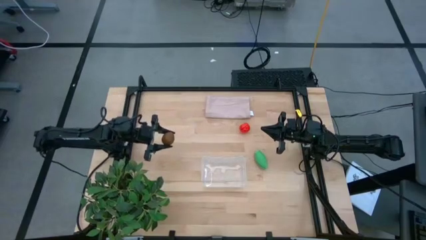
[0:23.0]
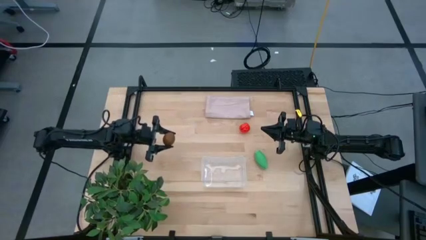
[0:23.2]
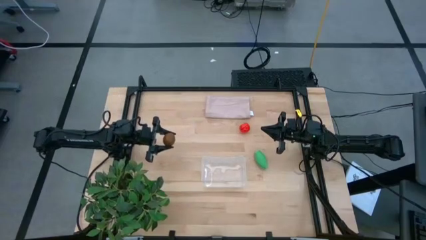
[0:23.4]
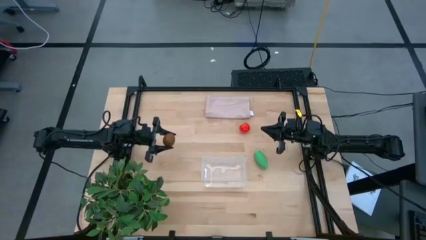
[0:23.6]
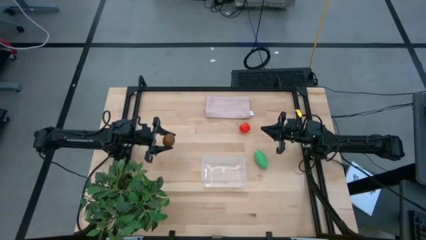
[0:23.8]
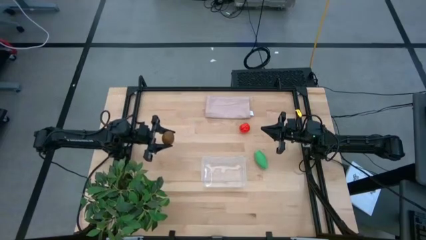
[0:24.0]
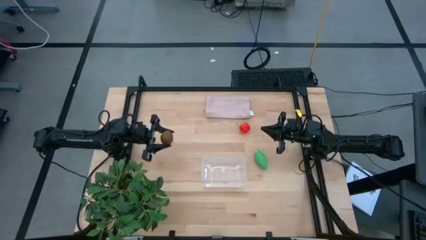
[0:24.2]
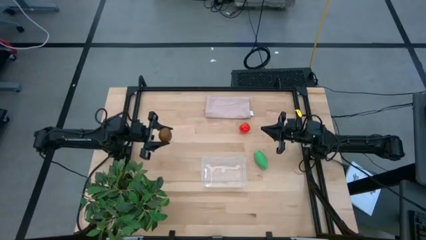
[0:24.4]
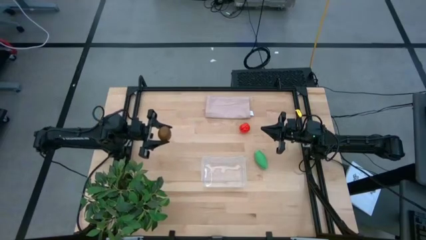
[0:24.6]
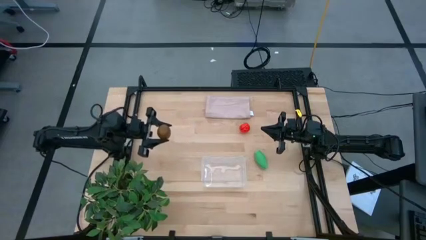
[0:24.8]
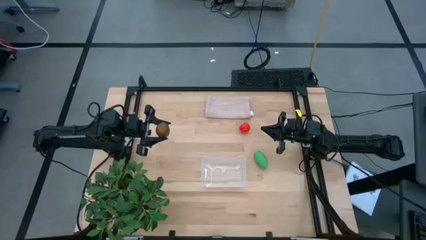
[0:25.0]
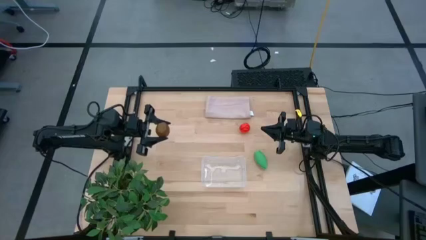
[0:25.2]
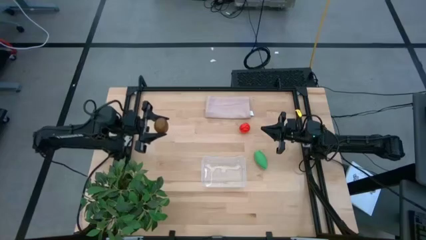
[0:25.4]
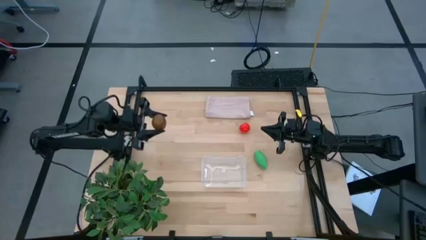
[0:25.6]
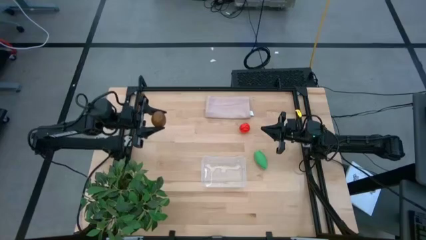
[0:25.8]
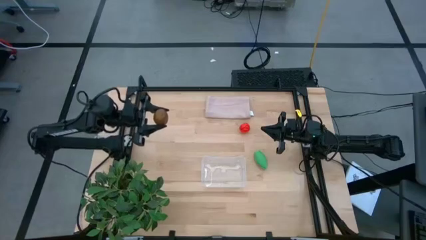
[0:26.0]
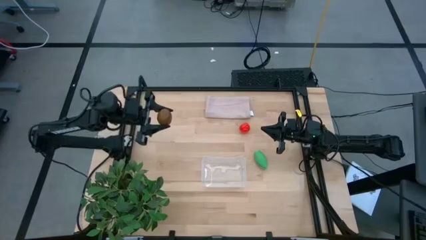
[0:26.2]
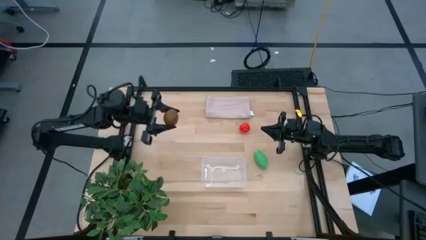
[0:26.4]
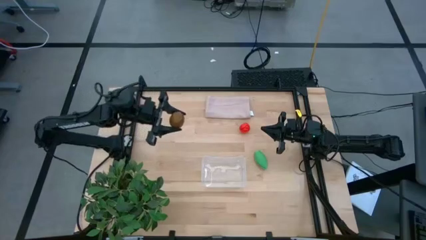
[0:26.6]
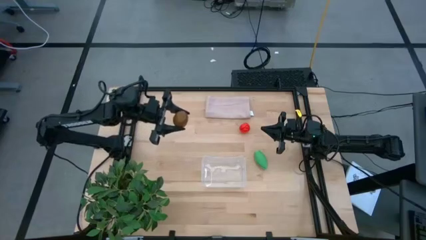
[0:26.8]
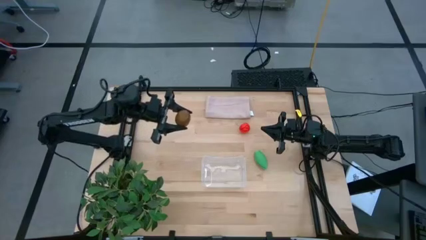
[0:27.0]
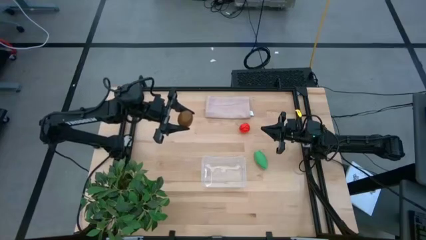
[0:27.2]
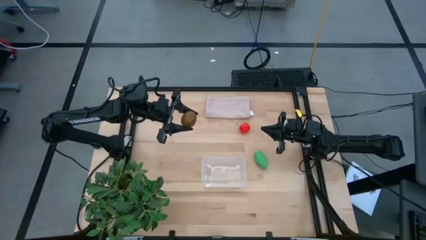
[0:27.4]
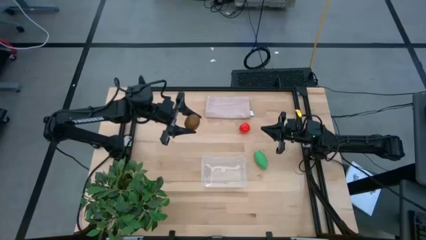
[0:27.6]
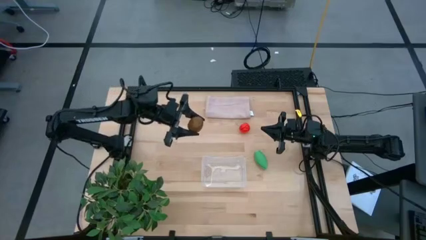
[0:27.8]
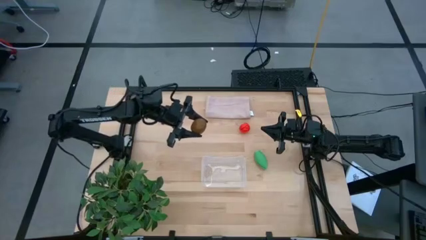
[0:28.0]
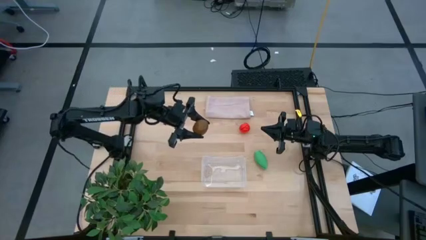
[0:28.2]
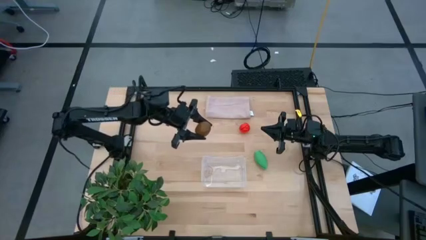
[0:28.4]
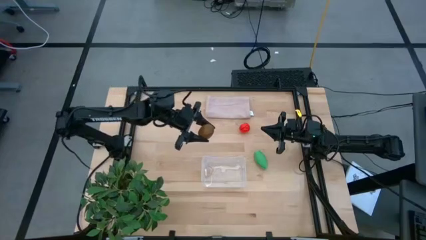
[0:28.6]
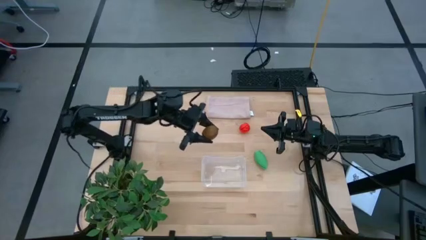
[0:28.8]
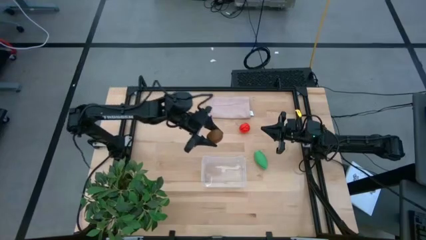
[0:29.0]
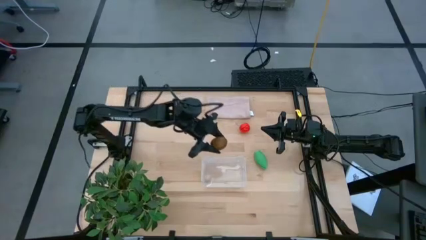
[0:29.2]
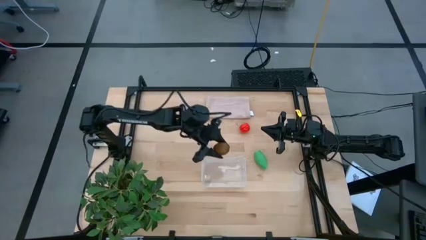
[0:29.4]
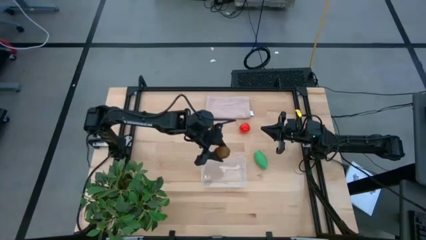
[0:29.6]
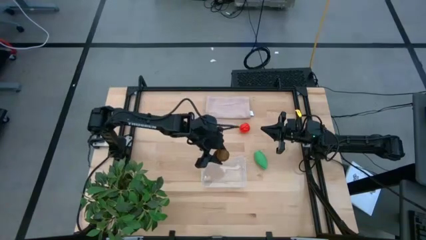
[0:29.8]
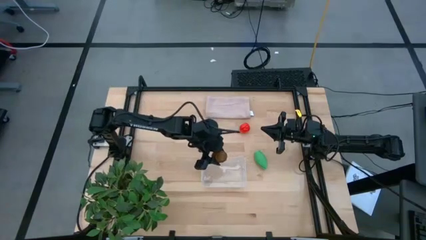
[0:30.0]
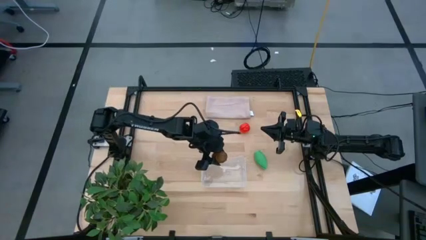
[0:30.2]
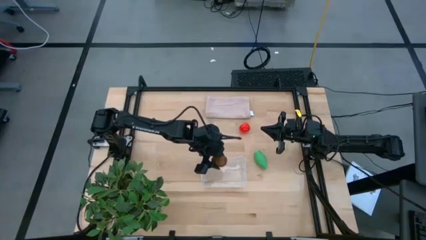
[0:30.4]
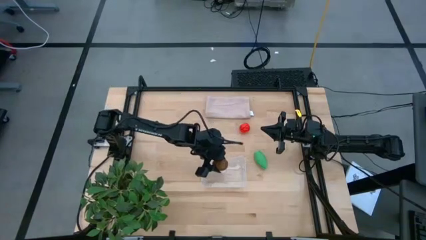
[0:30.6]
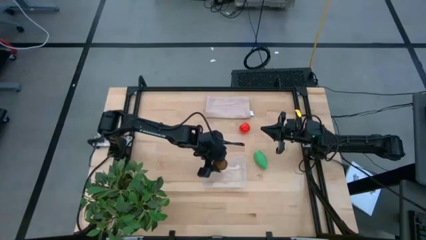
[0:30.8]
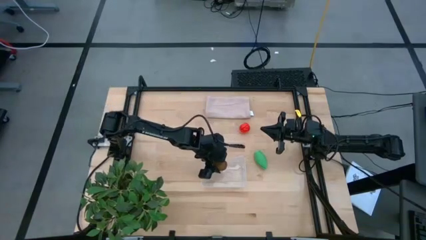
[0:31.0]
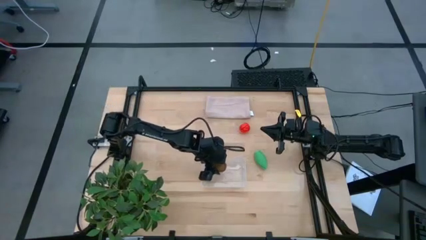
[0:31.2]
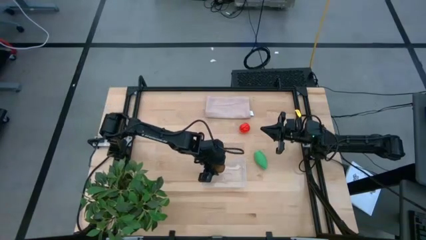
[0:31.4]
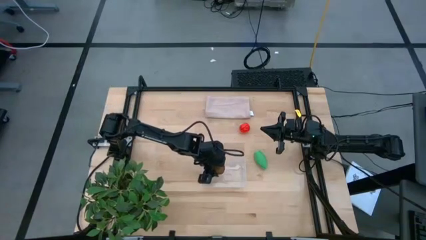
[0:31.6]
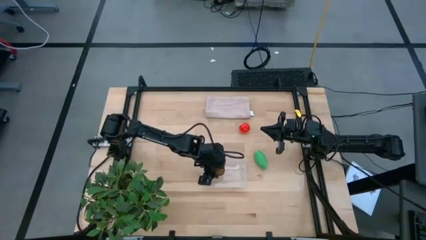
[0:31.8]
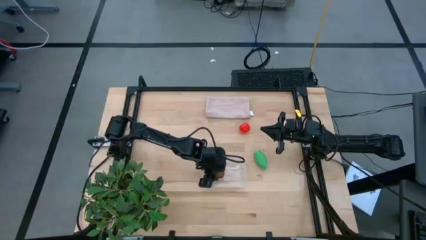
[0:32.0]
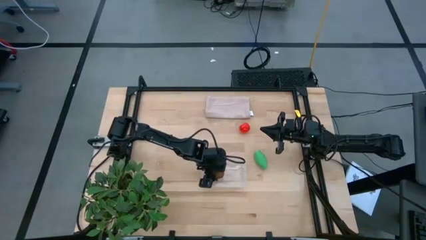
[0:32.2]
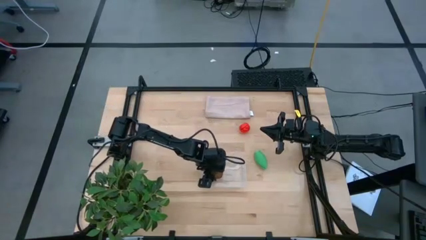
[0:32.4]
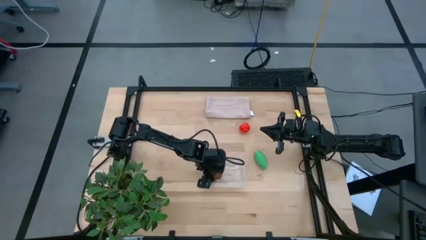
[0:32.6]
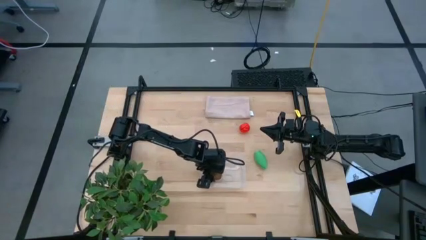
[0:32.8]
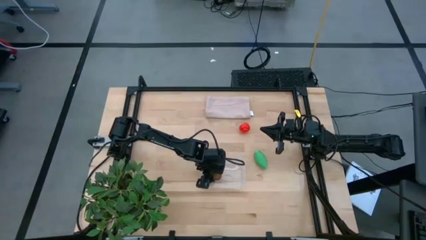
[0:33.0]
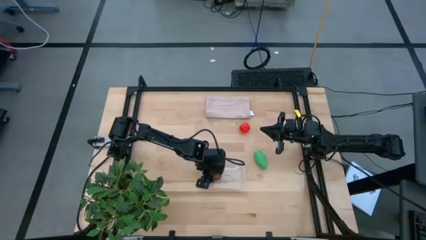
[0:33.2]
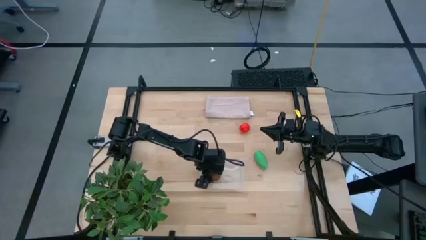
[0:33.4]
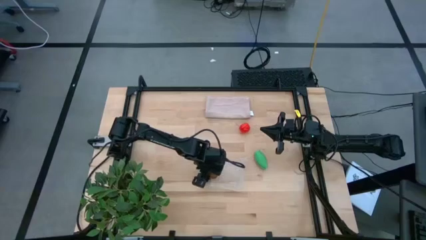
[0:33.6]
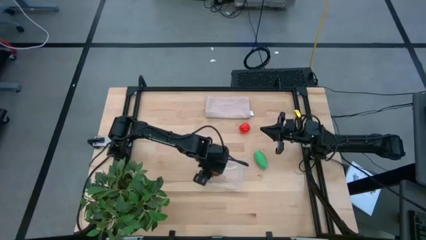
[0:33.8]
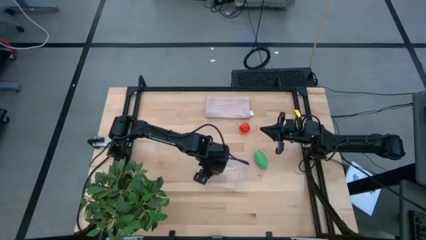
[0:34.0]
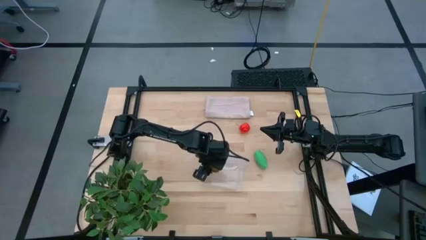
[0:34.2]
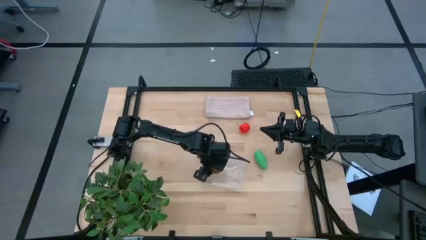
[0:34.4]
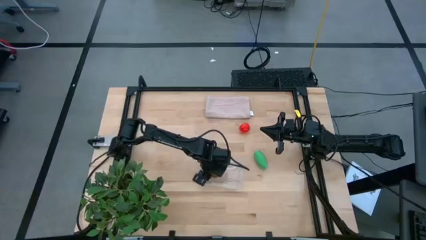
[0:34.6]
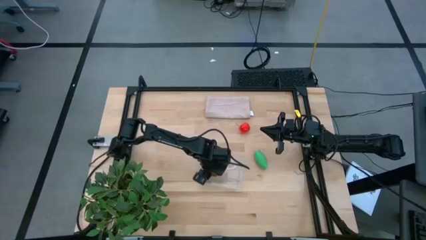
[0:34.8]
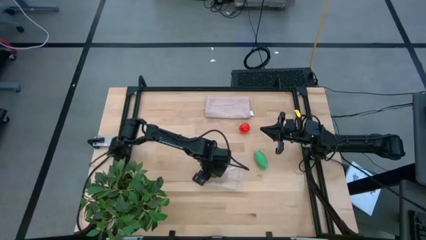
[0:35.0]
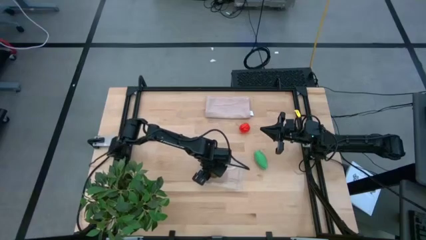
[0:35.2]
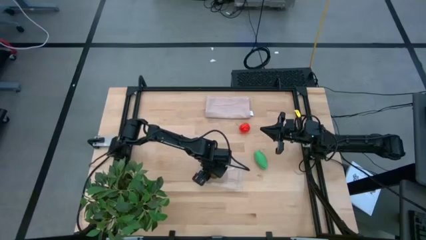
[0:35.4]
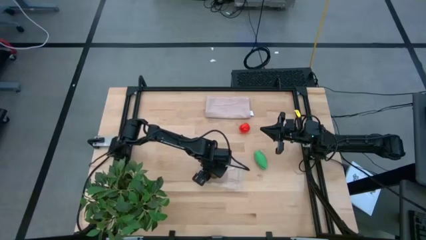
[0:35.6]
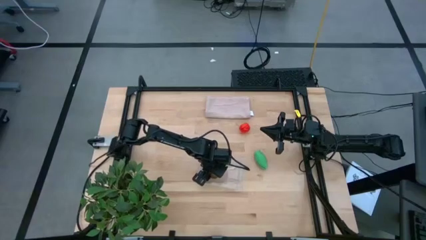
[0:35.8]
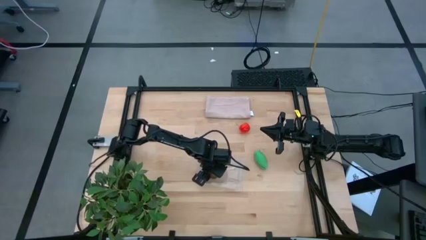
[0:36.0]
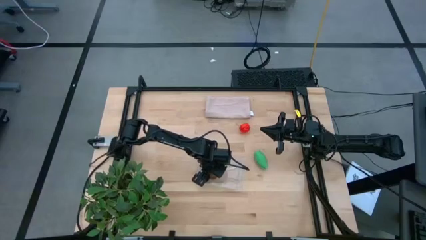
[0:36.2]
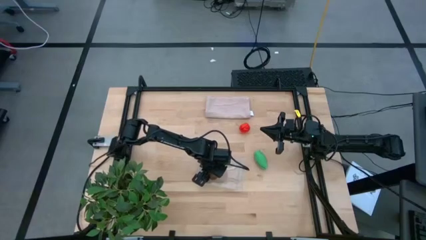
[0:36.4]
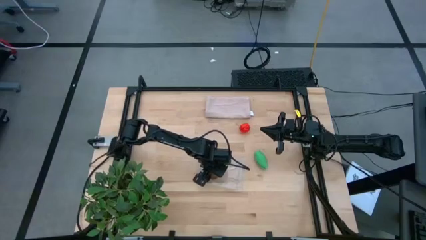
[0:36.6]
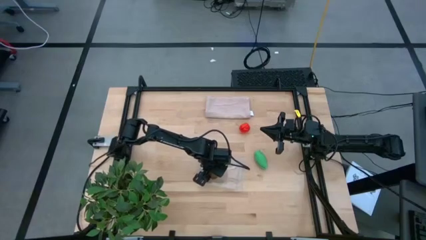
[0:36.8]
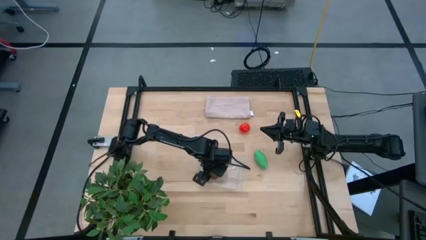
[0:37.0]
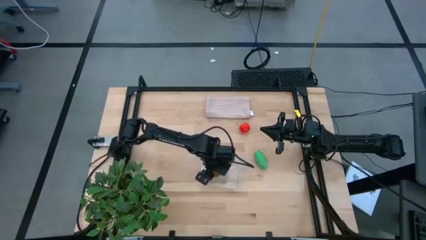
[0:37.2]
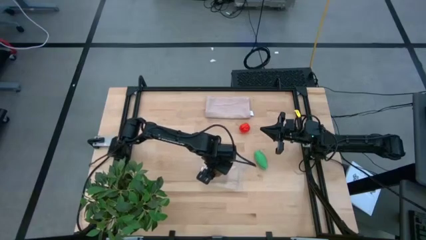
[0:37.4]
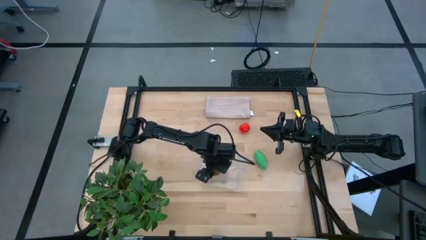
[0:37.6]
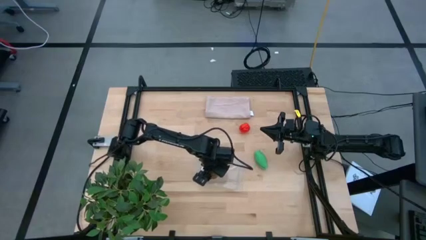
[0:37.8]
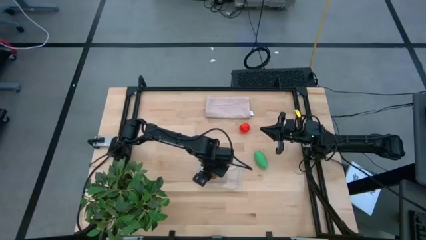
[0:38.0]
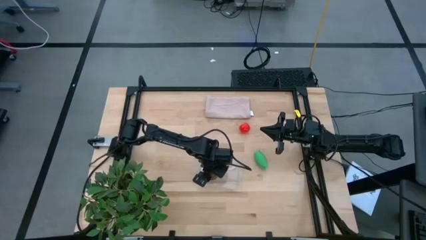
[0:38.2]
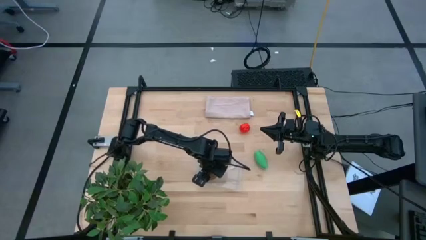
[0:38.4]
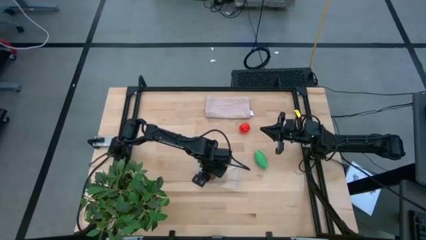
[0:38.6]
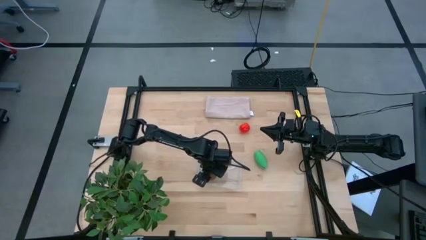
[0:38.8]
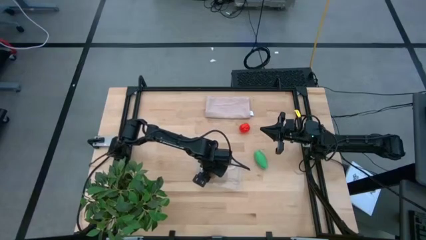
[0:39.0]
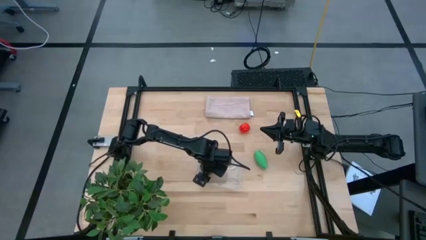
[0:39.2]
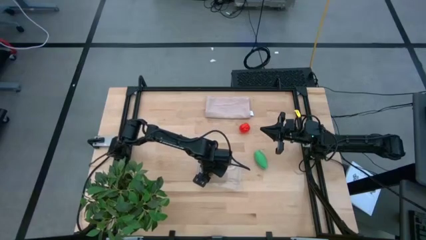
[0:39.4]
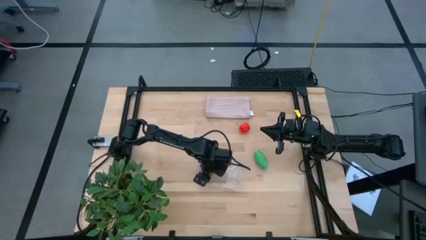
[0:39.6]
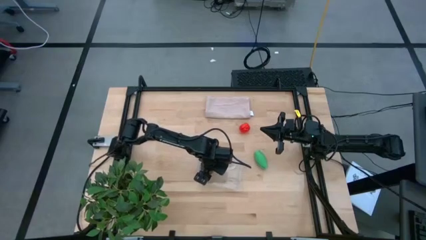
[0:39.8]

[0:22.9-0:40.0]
Task: Pick and placing Produce into tupperware
Put the kiwi into the transparent bin
